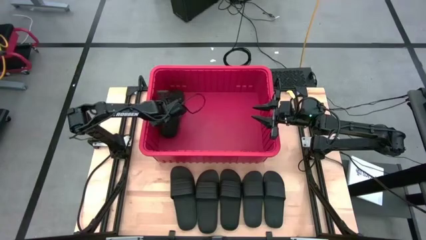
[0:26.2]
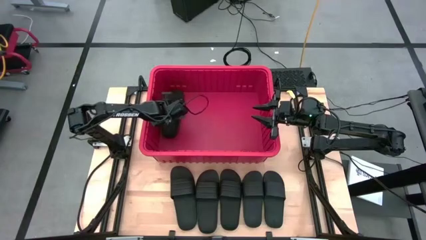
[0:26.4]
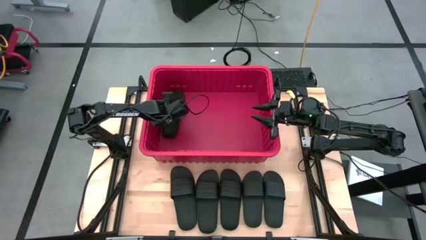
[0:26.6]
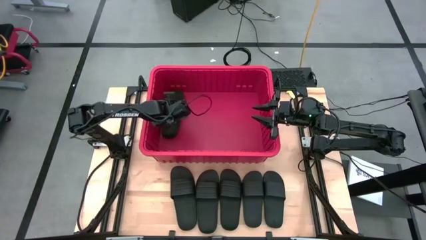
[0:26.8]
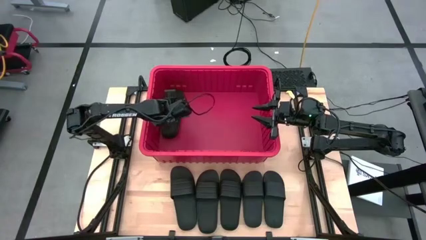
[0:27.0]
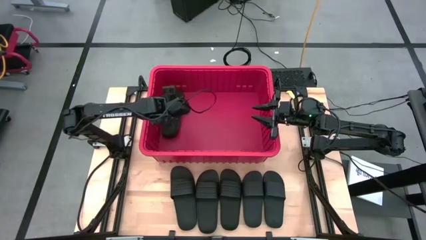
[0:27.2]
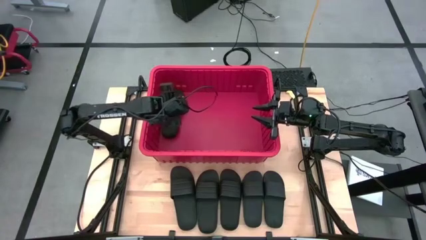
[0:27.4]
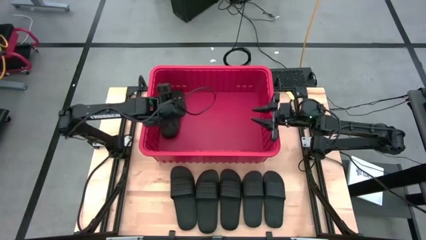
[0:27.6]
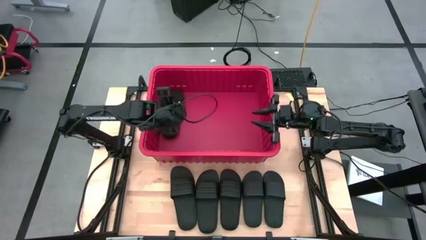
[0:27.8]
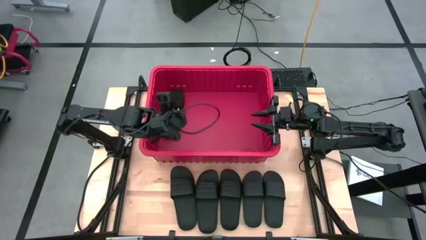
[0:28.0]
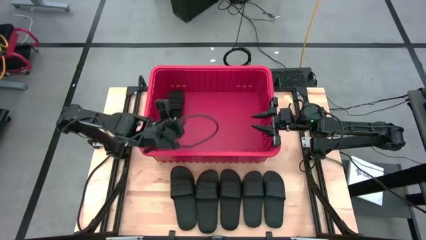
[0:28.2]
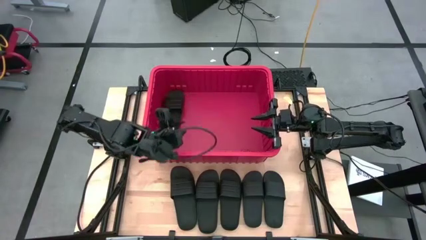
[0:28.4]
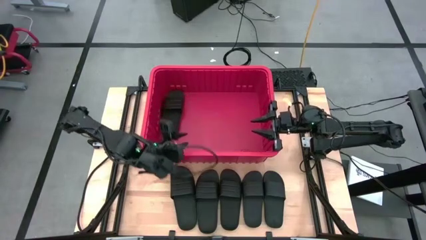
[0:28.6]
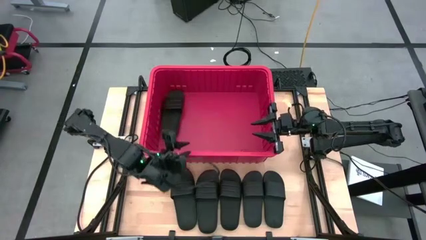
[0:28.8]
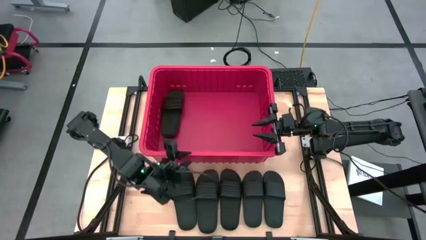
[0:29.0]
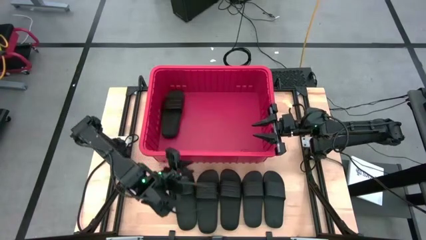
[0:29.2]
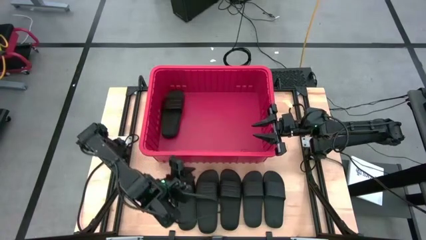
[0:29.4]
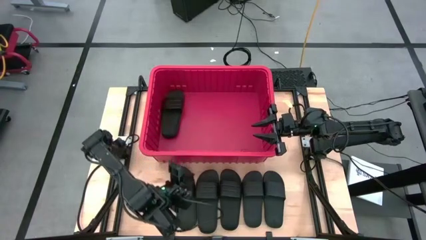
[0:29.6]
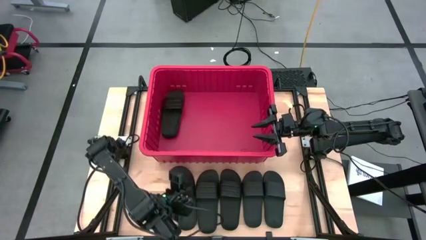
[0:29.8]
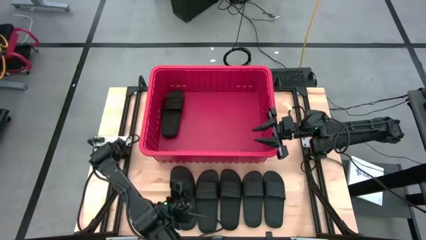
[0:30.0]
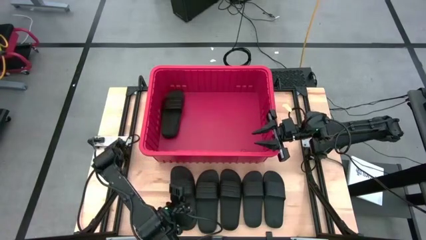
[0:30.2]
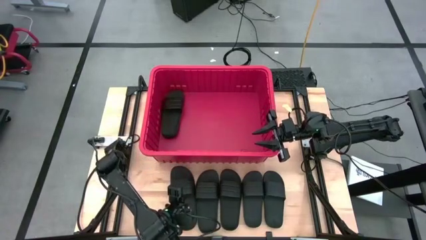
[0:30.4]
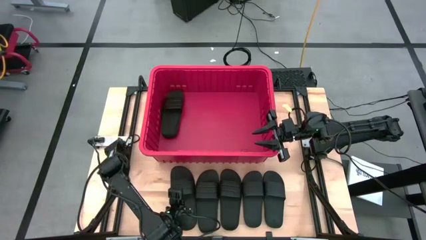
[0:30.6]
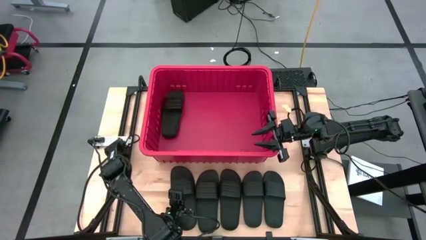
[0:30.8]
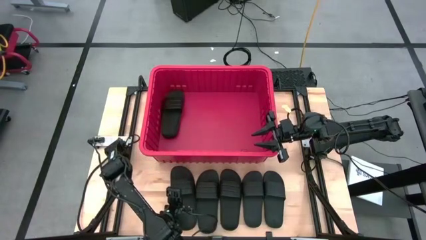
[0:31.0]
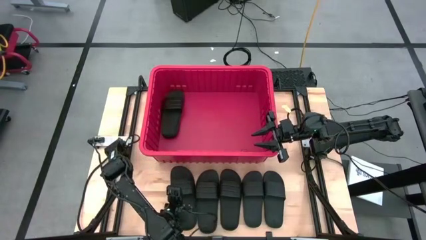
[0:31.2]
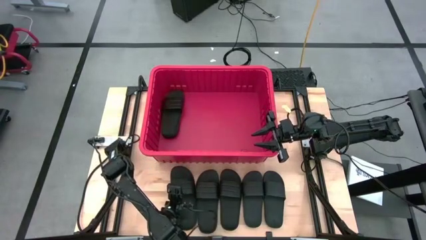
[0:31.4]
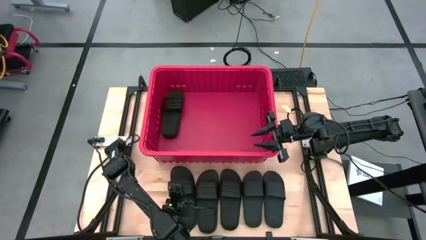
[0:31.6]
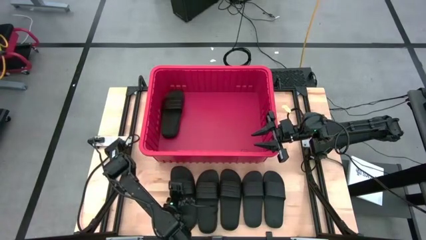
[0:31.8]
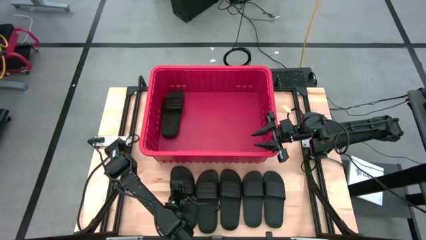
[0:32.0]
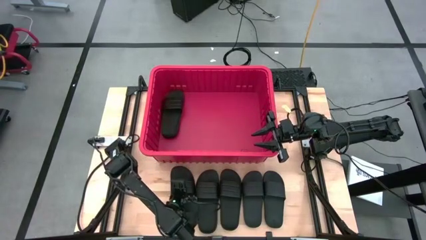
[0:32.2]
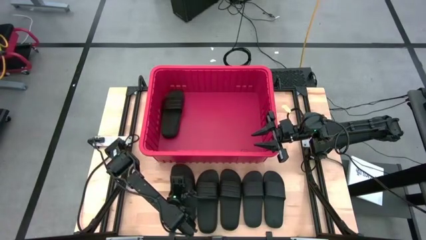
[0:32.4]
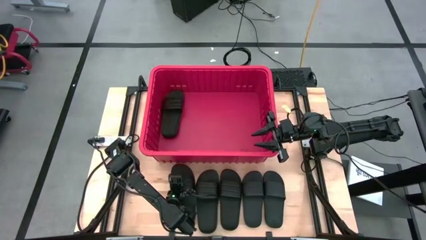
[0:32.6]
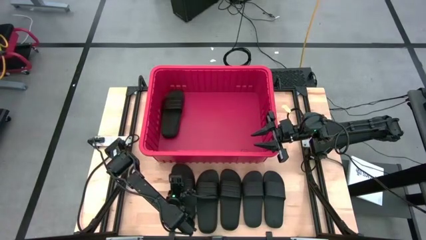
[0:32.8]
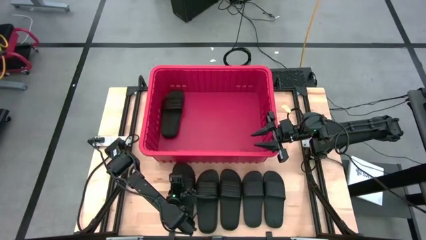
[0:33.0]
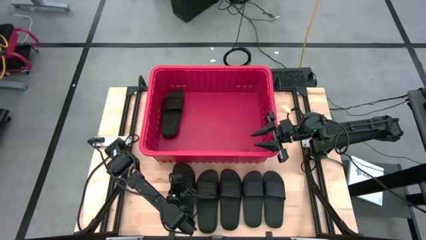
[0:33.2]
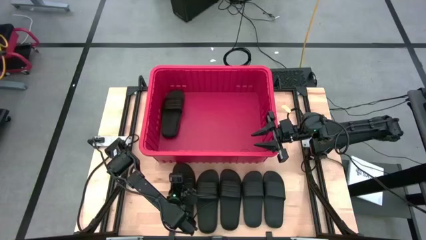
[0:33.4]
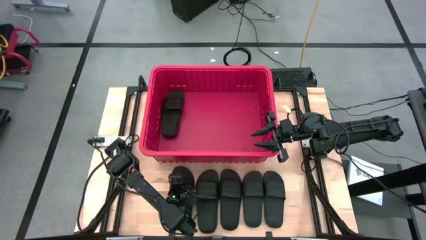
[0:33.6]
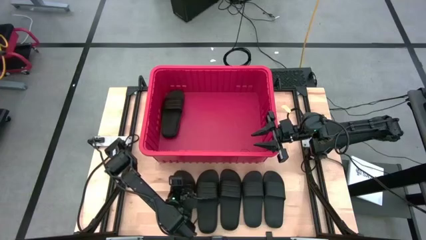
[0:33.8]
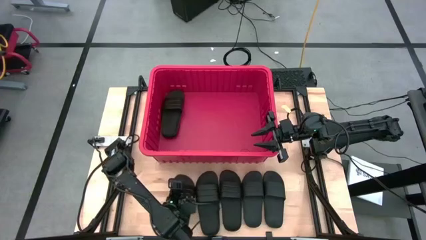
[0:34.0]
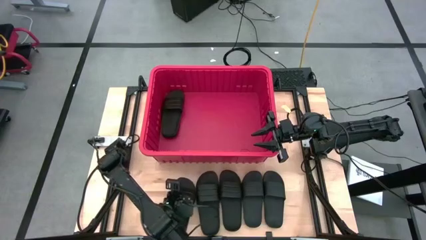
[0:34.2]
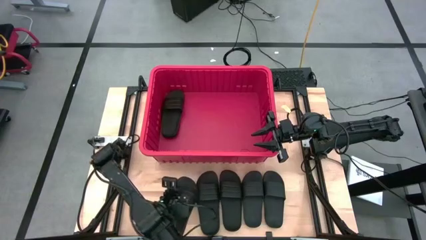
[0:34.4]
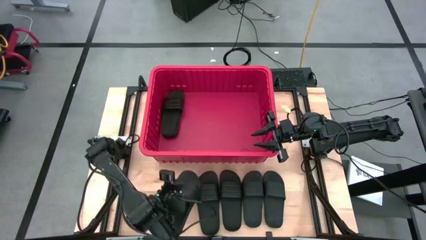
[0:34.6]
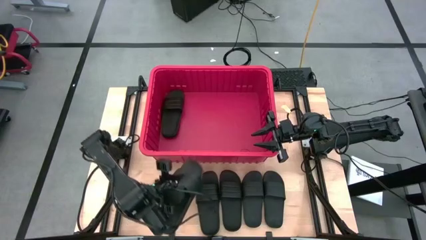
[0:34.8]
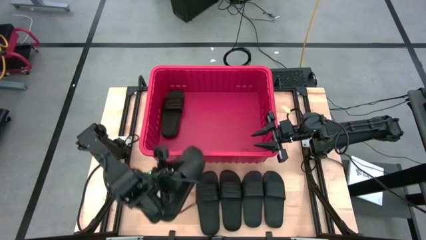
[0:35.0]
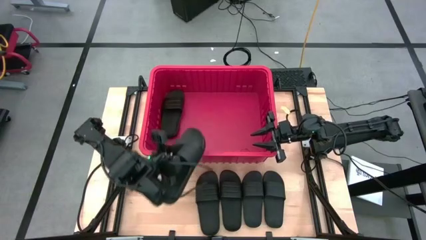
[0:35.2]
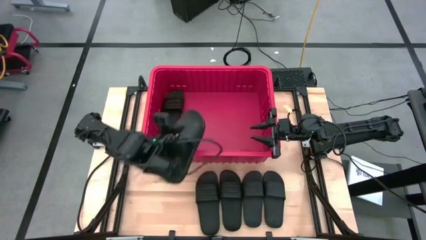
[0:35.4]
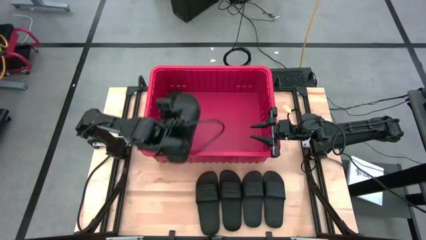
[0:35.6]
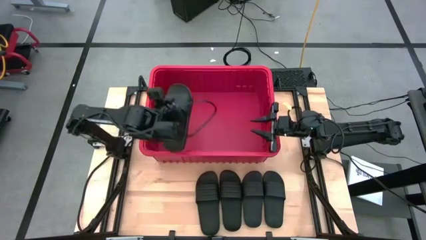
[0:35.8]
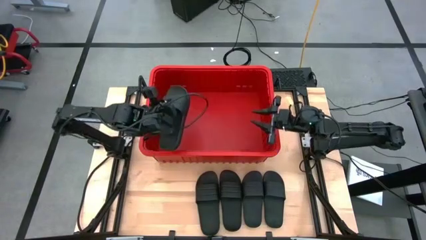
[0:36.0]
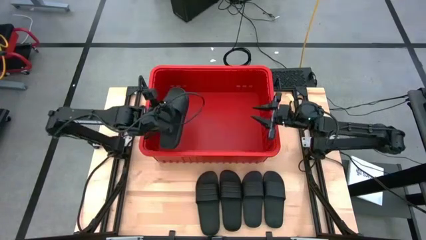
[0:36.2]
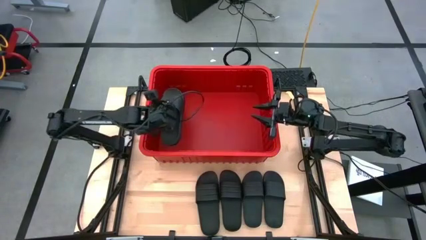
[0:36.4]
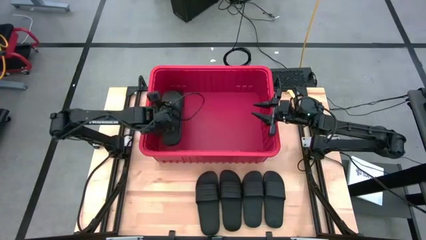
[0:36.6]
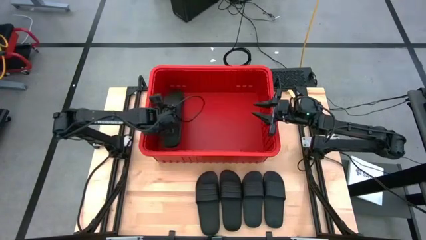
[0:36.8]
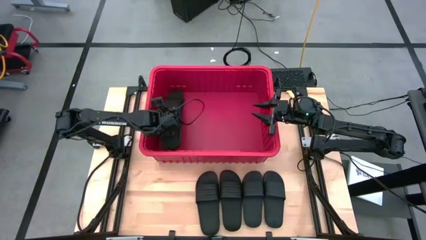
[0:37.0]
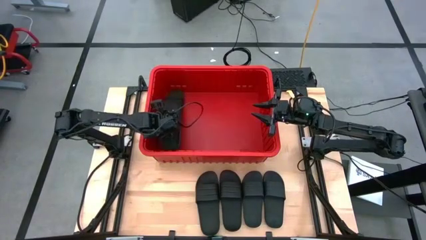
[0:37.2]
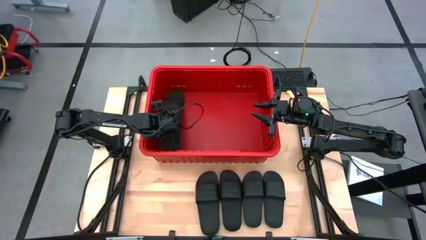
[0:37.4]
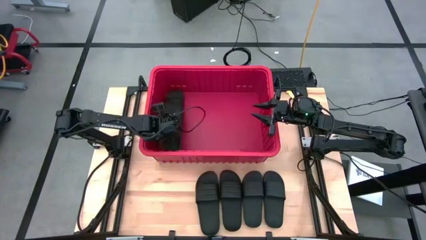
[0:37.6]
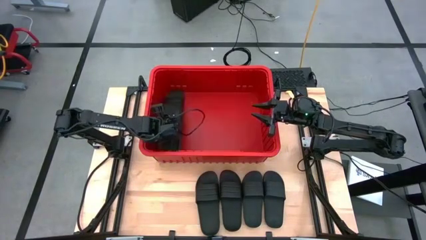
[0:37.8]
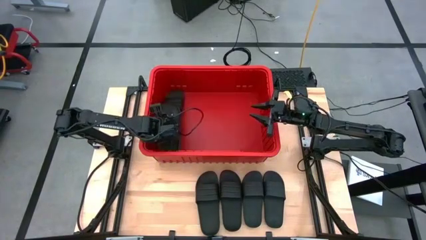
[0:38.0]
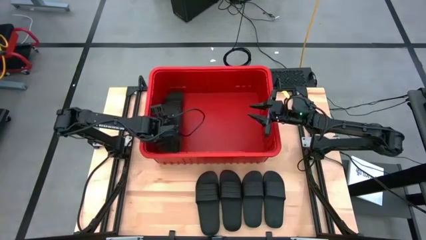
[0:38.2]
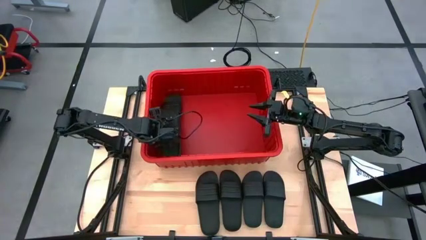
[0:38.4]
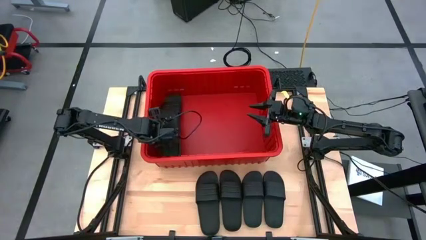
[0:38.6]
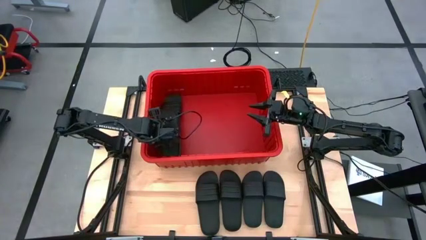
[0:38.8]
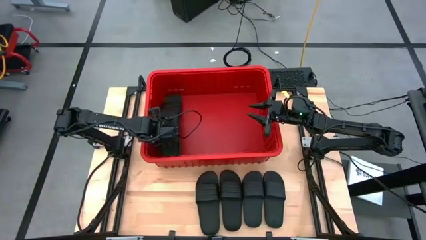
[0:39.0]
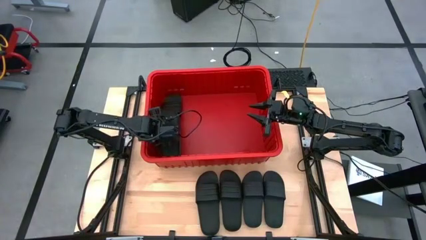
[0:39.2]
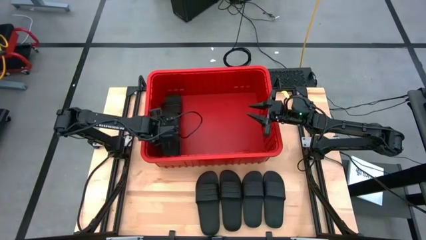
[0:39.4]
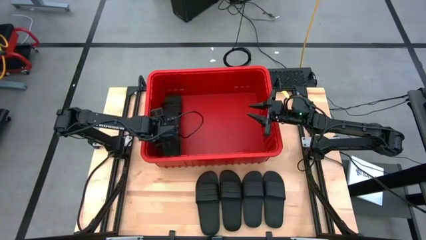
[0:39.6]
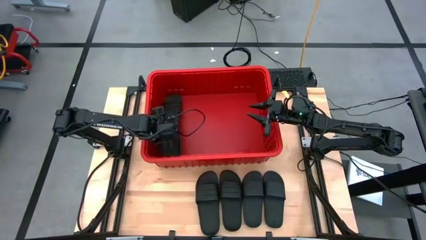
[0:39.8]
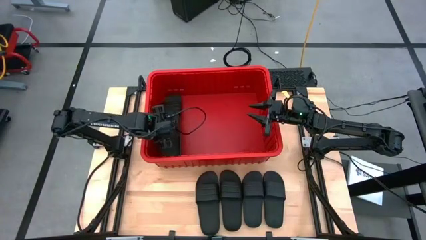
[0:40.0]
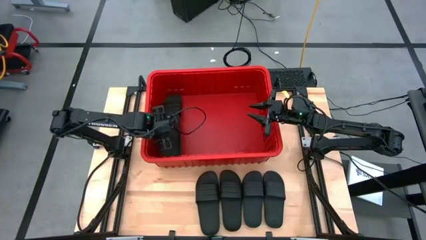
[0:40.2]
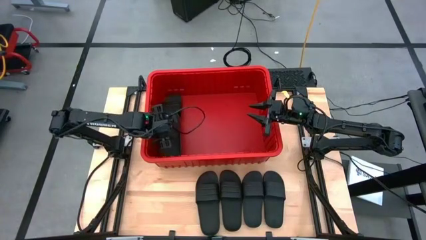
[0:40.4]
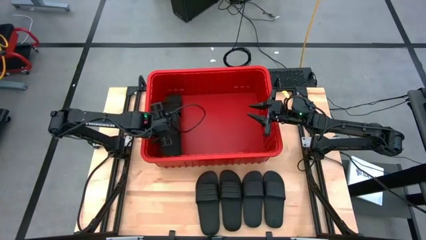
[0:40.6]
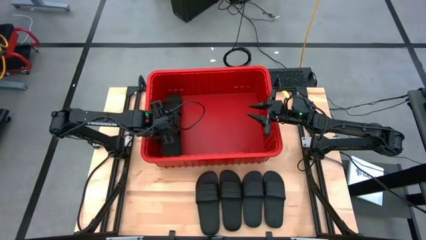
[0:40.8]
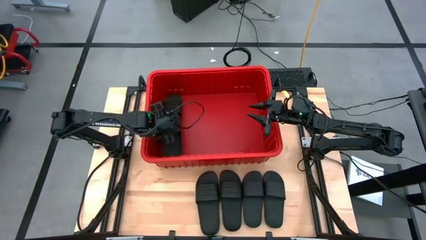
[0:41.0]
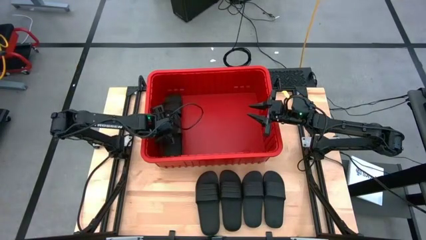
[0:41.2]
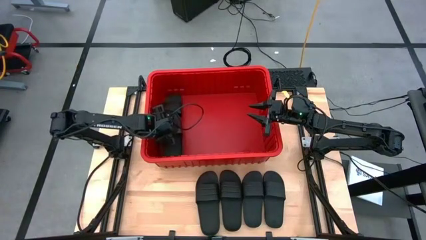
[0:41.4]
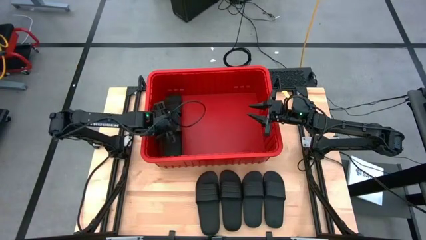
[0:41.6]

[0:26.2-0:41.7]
Task: Pick and place slides into bin
Put the black slide into the red bin
